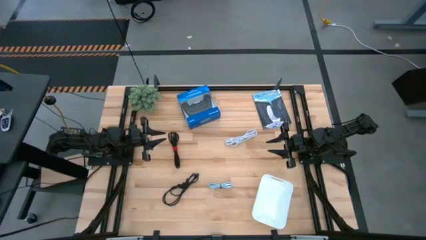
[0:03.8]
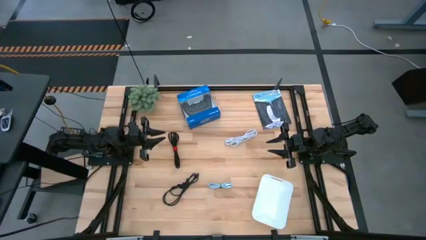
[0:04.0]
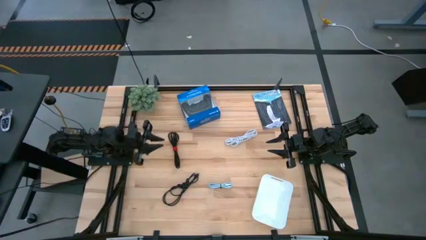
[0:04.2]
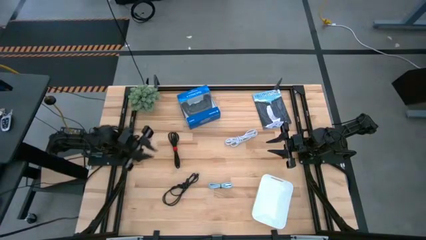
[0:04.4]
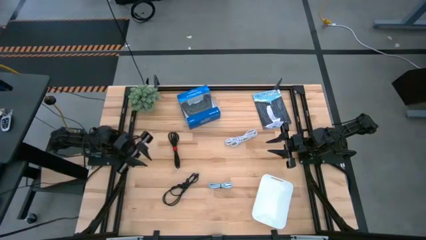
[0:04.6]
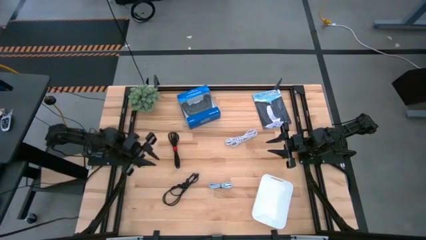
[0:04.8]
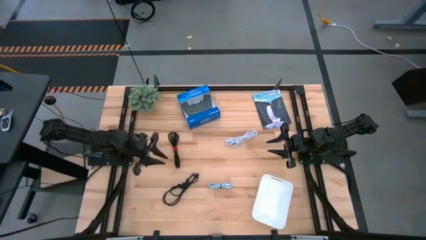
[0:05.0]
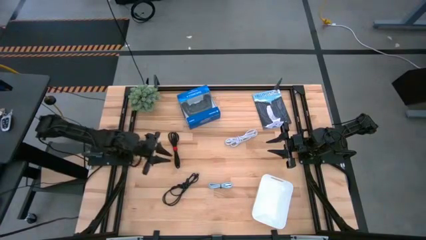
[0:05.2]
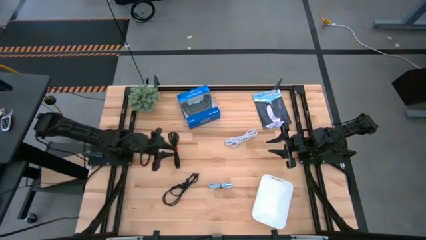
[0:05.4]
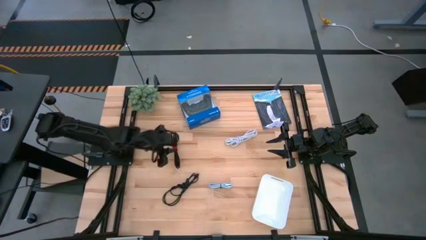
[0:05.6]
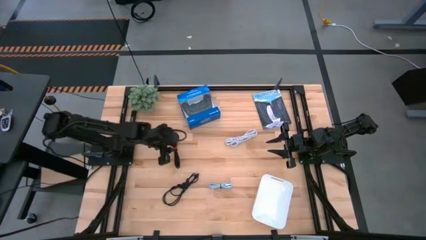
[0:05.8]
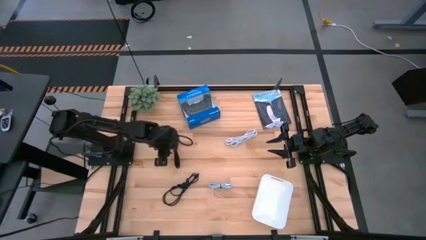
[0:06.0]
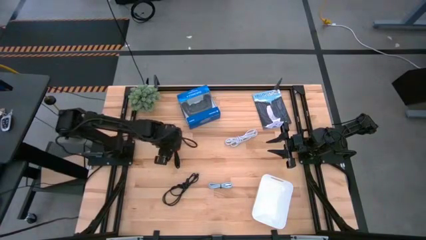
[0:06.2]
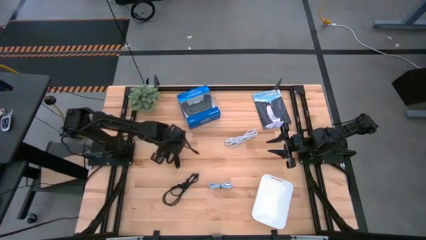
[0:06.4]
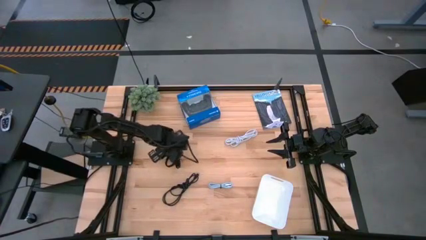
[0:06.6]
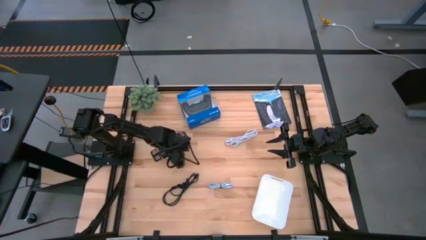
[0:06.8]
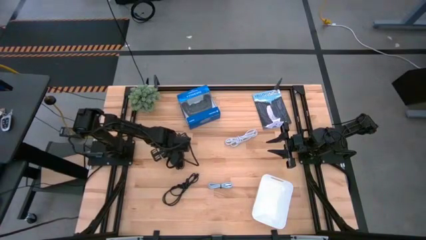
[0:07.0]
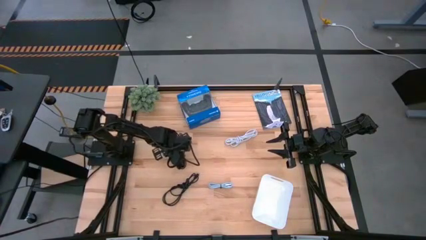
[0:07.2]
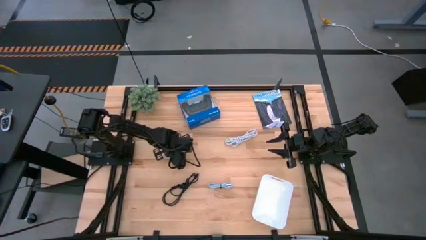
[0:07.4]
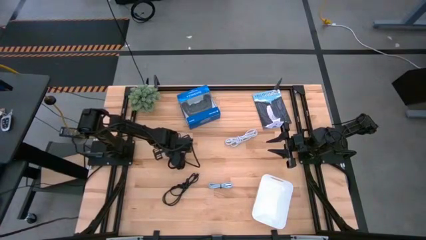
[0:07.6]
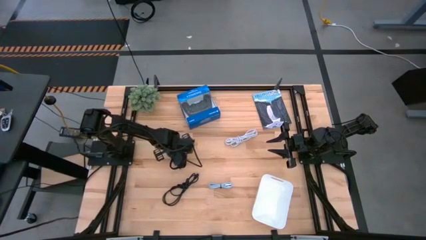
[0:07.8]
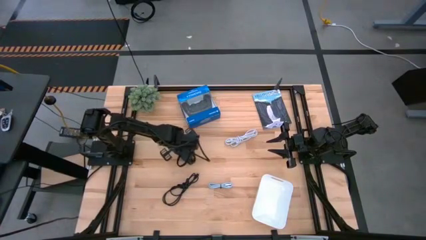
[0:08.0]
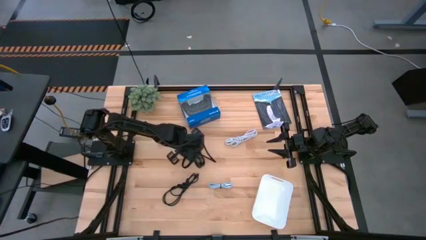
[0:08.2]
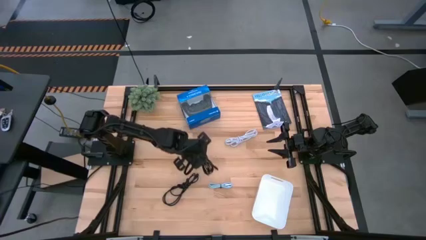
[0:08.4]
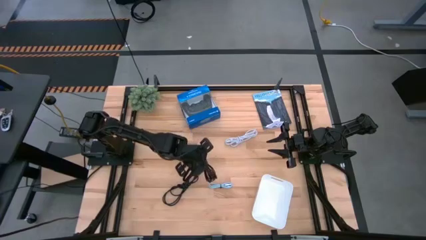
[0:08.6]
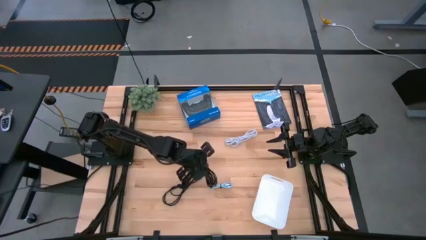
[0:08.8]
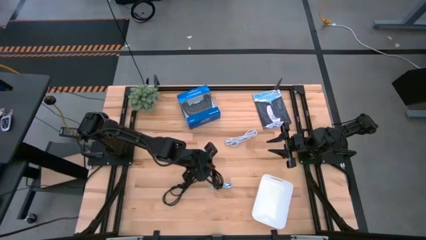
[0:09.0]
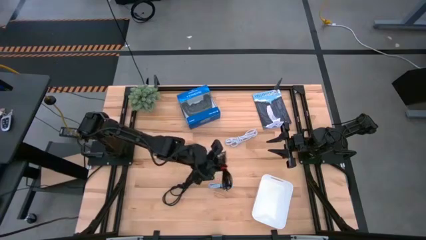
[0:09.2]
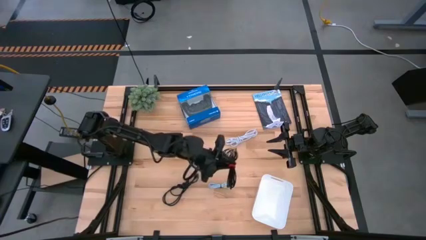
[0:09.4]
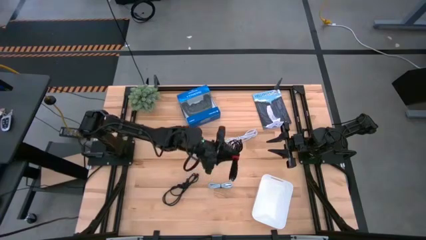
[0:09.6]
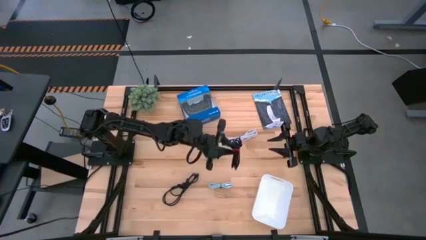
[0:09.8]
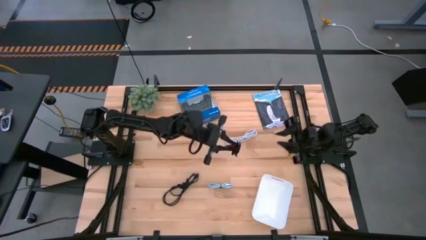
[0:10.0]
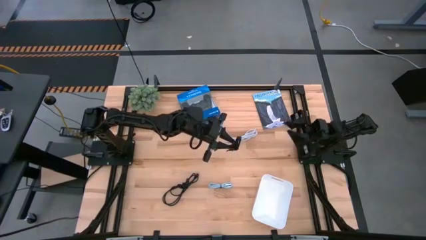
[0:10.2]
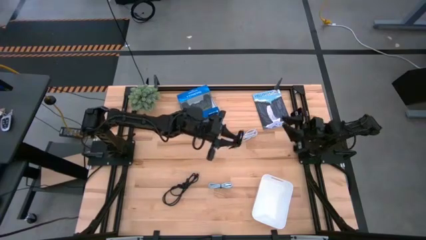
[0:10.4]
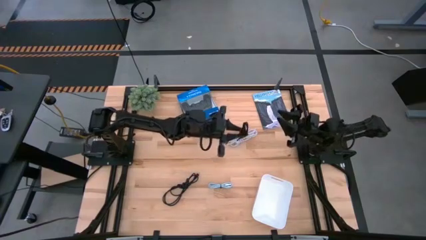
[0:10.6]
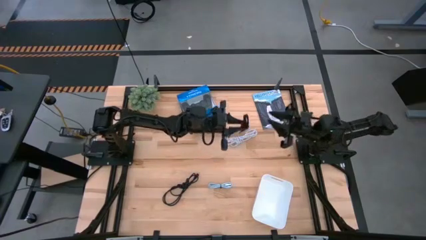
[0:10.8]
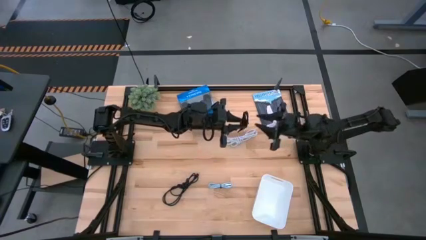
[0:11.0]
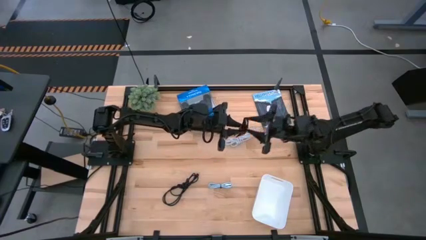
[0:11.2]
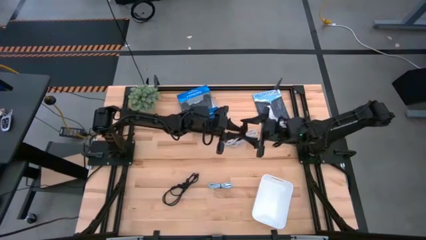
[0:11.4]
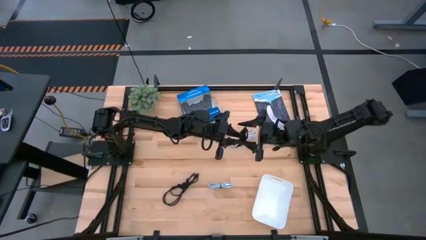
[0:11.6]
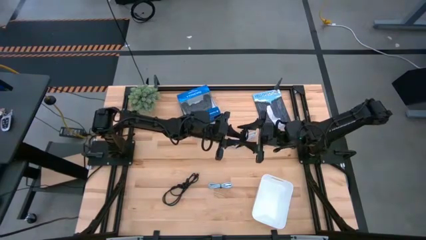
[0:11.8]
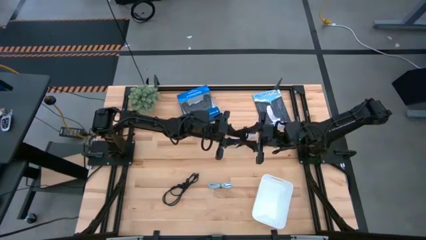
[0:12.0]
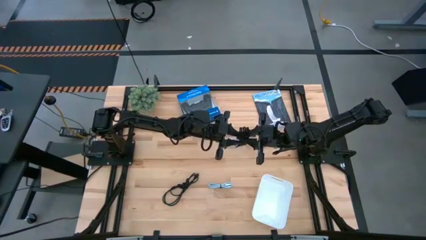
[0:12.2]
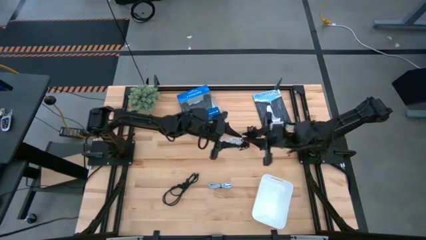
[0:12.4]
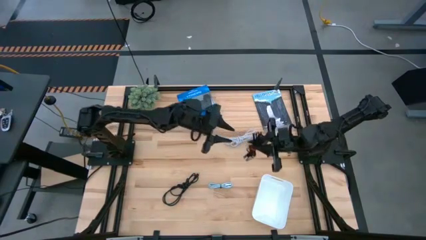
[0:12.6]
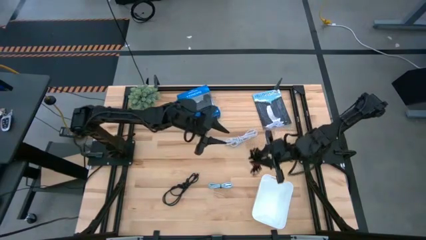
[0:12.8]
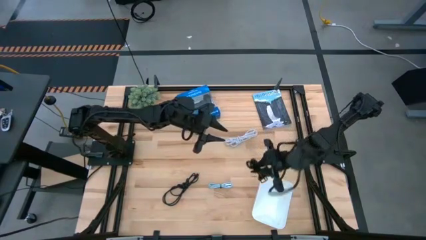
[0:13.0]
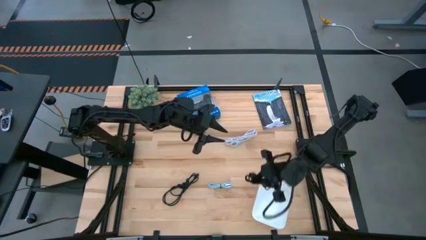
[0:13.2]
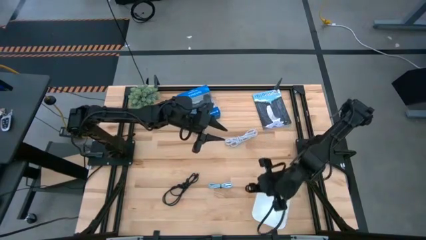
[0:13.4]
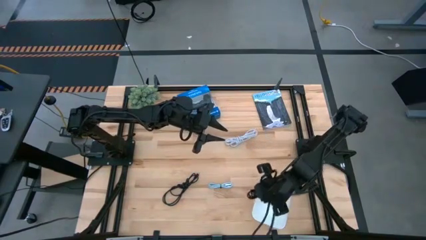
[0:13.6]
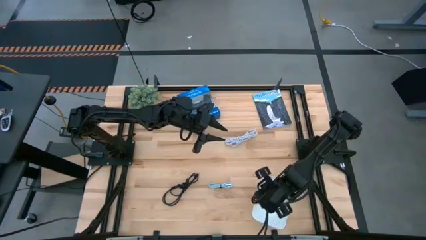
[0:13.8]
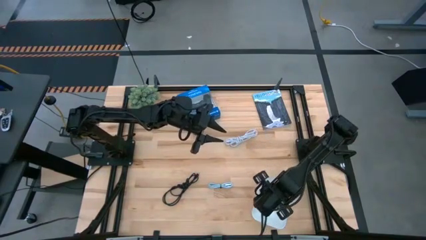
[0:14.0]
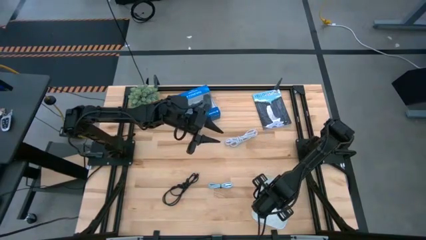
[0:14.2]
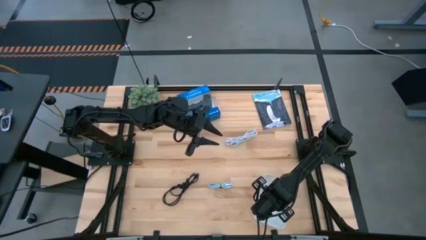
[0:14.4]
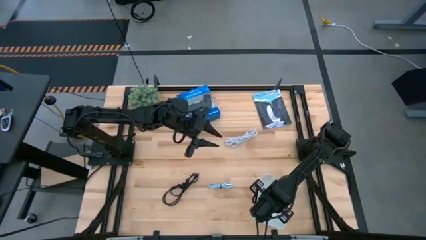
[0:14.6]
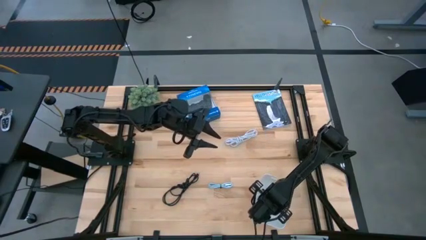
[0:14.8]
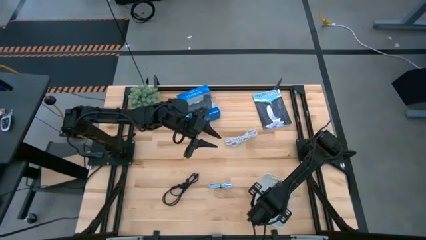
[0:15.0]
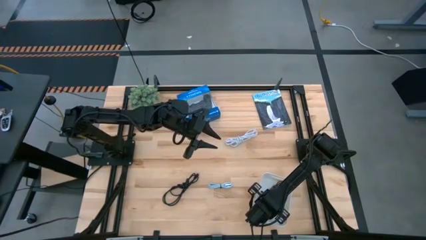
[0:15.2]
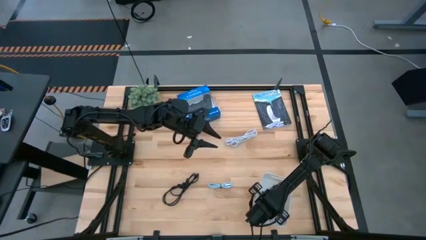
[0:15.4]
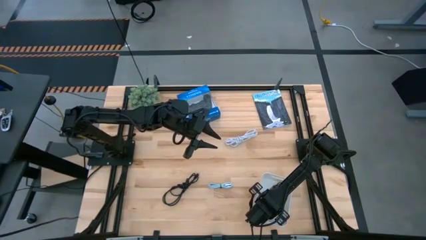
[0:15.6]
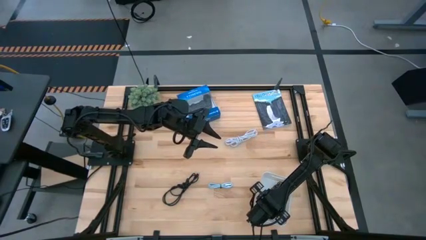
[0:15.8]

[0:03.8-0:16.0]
Task: Pick and place USB-C Cables
Put the top black charger cable into the white bin
